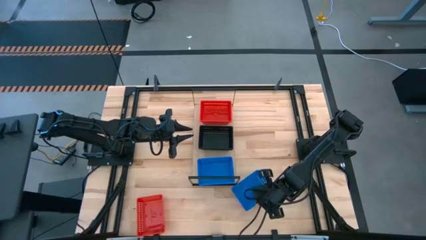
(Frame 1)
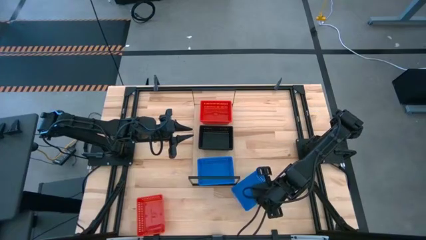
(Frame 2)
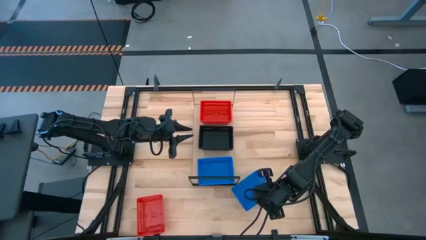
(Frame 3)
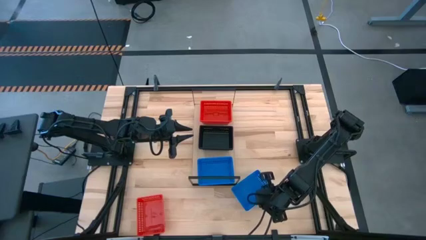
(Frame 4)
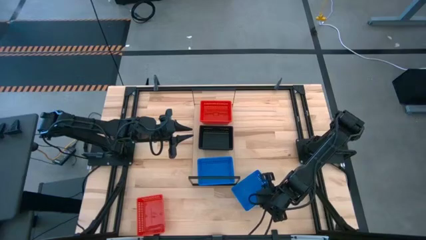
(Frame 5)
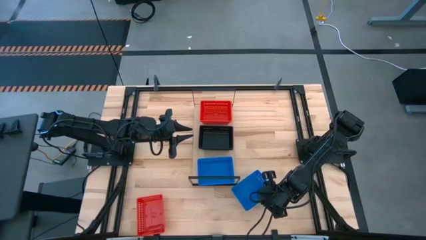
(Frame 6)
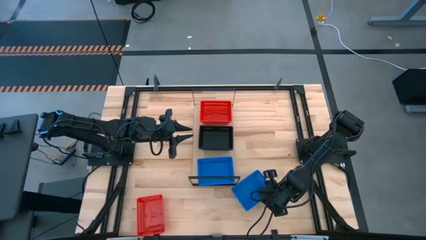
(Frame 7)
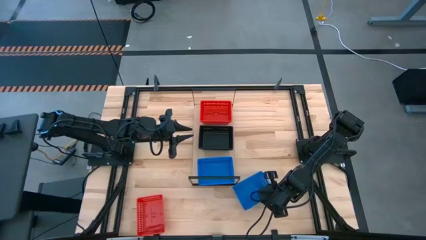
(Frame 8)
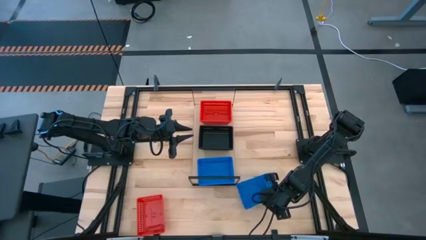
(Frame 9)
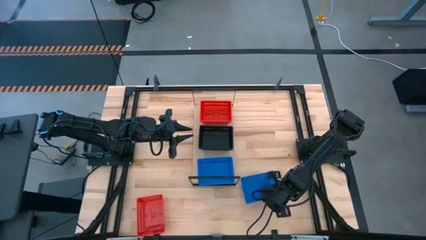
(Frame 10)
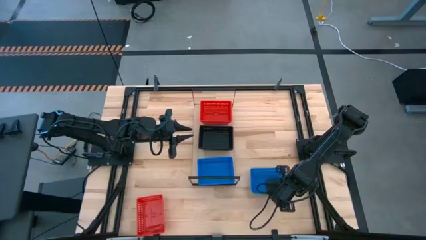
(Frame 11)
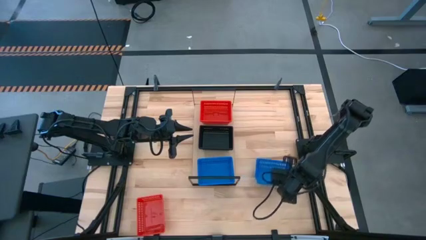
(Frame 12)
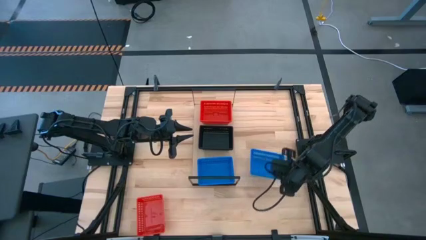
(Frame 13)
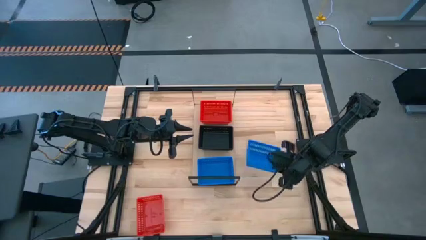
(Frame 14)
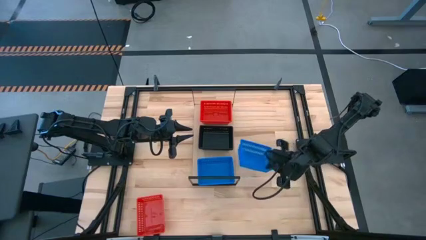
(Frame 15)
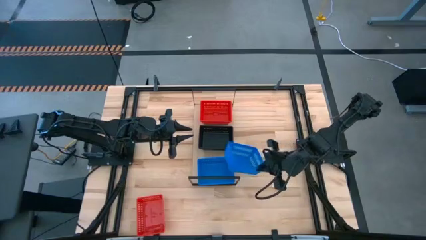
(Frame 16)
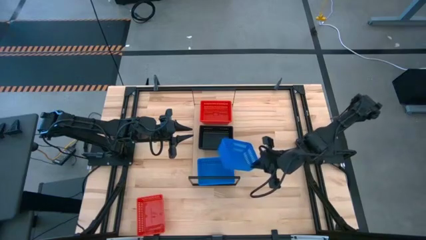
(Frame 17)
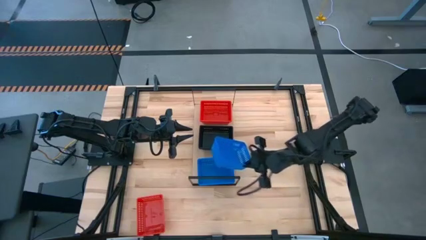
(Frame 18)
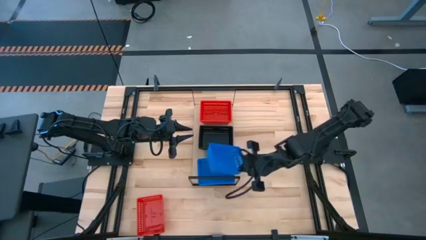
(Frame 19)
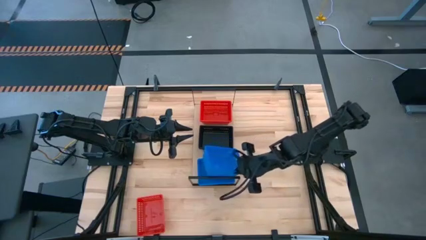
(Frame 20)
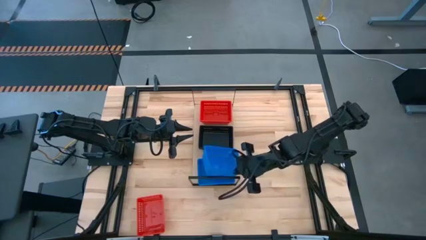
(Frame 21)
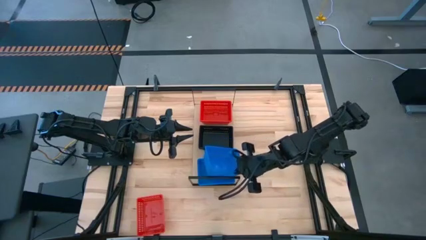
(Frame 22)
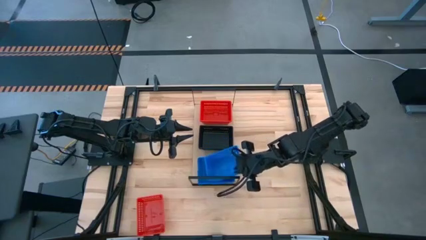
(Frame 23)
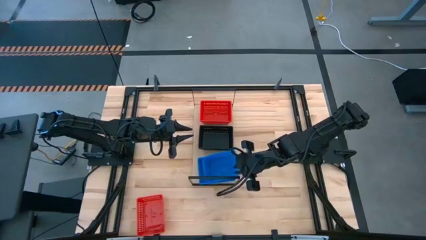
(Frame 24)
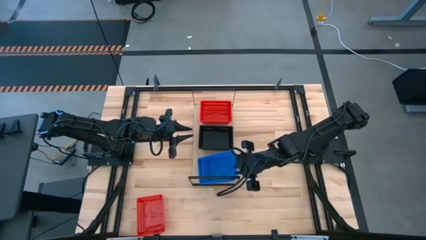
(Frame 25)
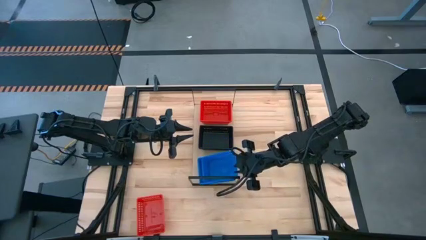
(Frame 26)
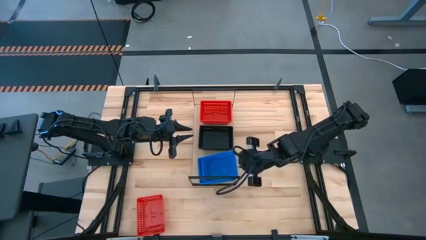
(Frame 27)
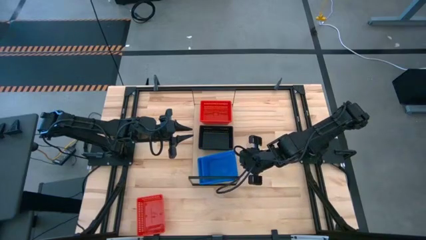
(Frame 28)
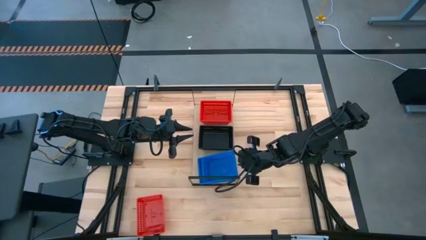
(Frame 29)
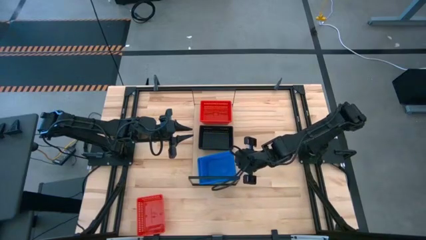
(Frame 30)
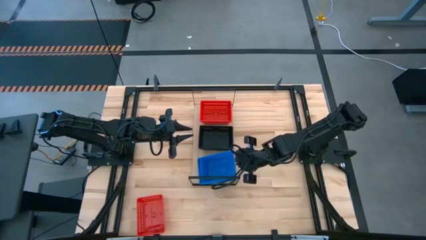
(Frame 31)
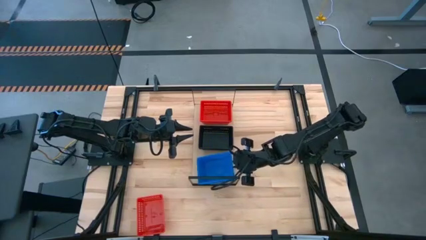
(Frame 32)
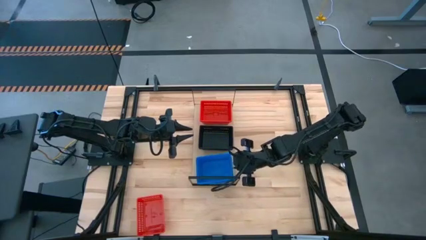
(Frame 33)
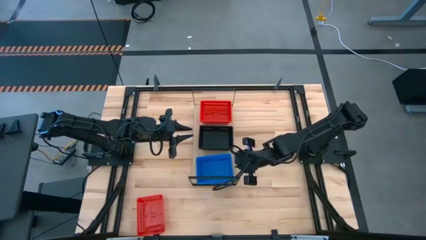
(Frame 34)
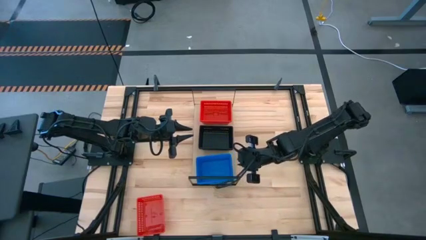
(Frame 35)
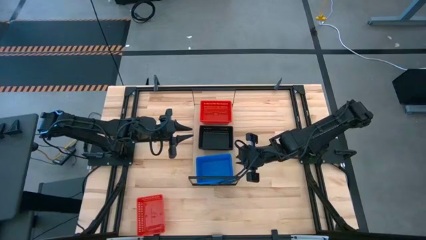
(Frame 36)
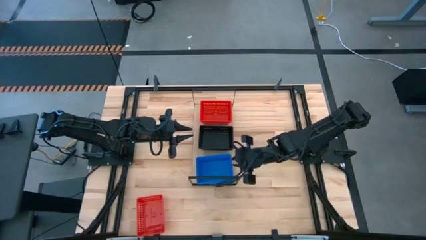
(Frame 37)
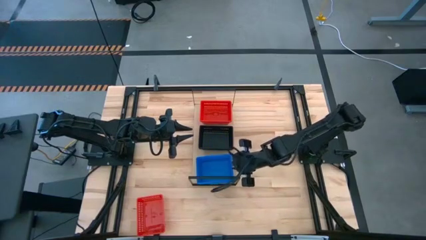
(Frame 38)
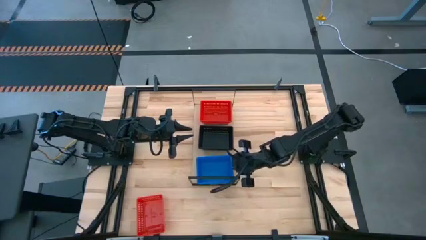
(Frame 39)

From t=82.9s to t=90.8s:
Task: Stack baskets on shelf by color
Stack the blue bin on top of the blue bin on the shelf

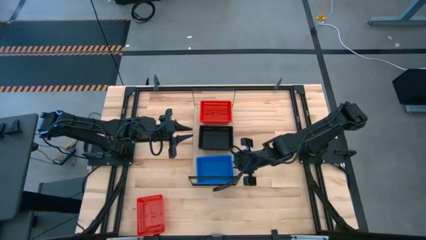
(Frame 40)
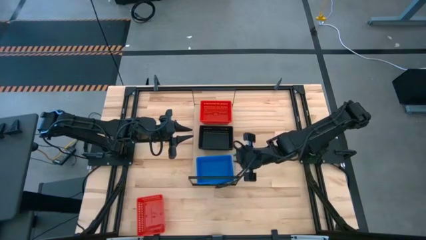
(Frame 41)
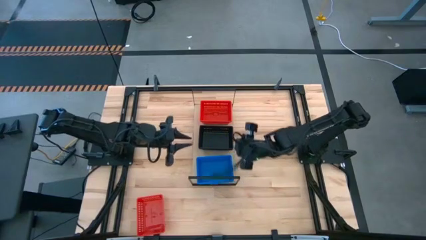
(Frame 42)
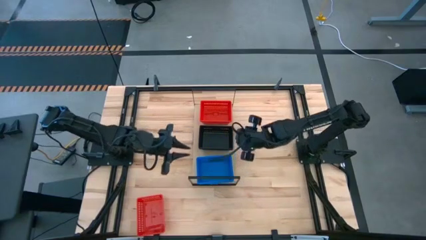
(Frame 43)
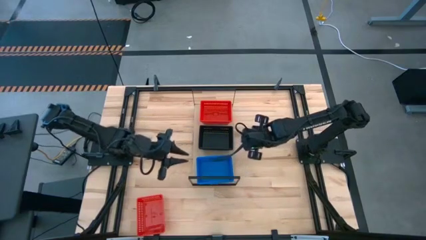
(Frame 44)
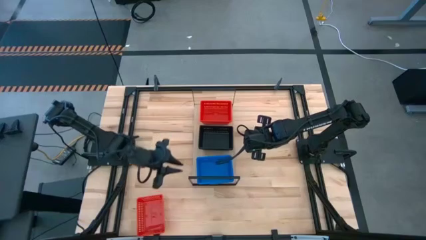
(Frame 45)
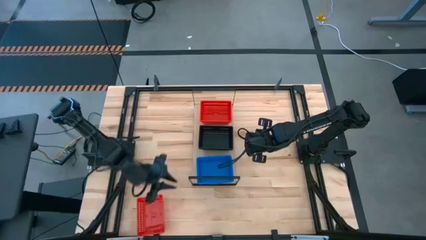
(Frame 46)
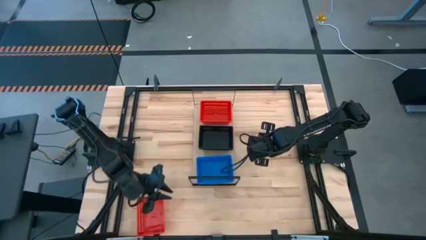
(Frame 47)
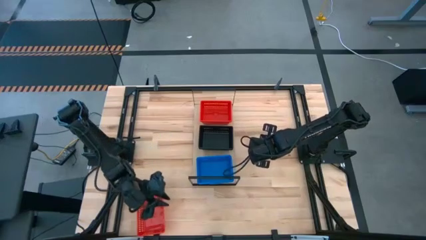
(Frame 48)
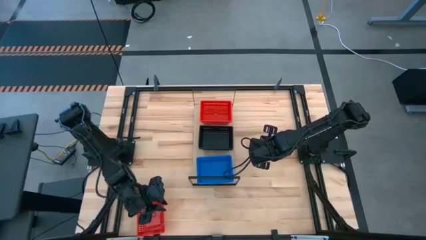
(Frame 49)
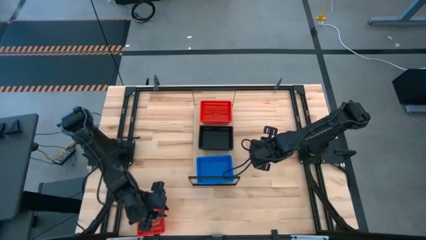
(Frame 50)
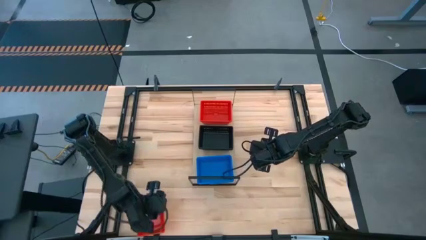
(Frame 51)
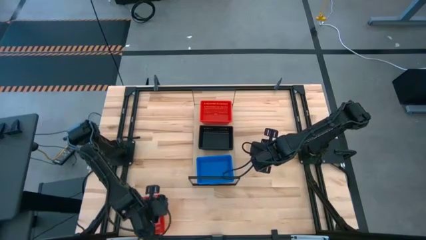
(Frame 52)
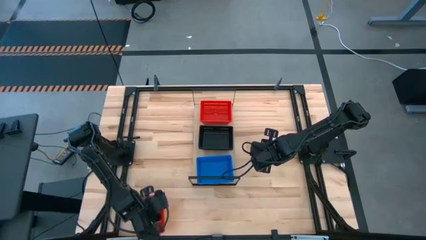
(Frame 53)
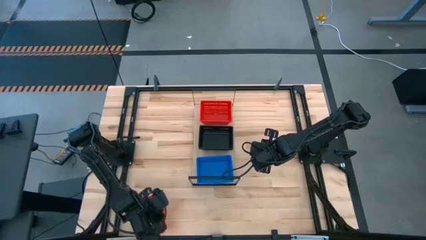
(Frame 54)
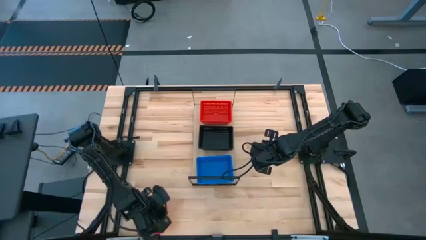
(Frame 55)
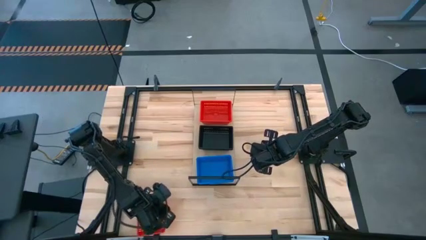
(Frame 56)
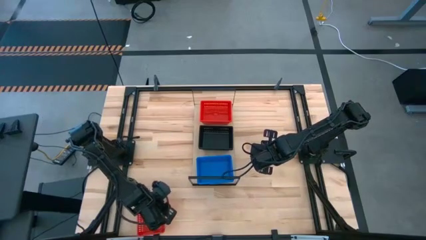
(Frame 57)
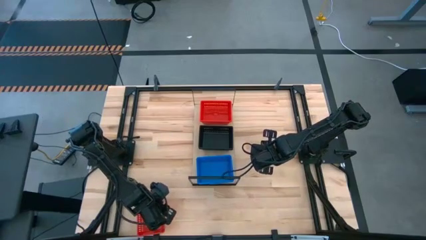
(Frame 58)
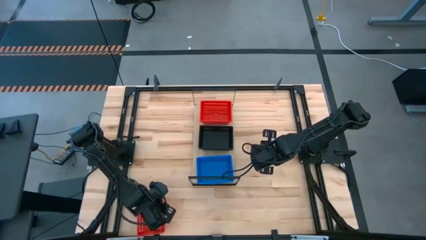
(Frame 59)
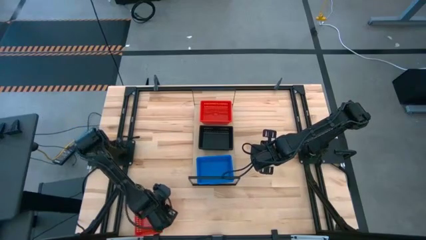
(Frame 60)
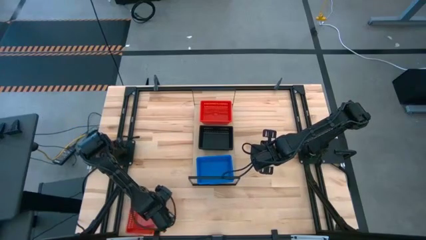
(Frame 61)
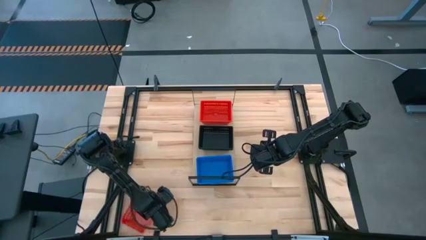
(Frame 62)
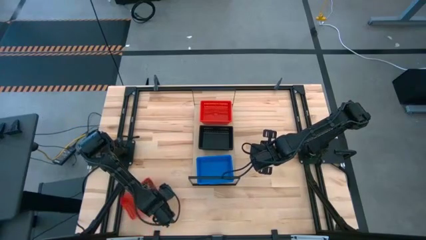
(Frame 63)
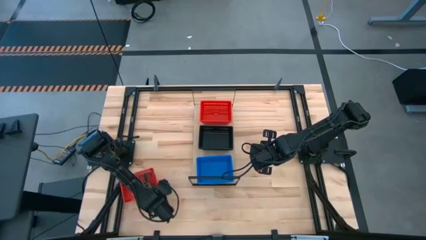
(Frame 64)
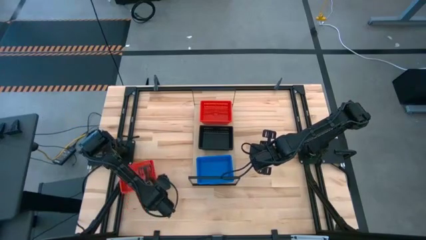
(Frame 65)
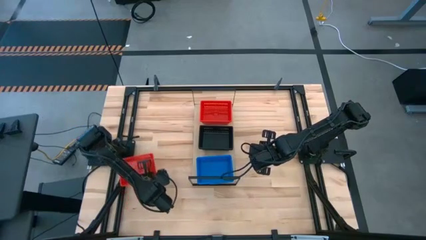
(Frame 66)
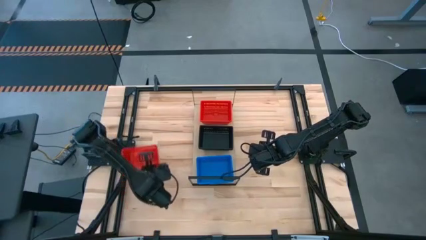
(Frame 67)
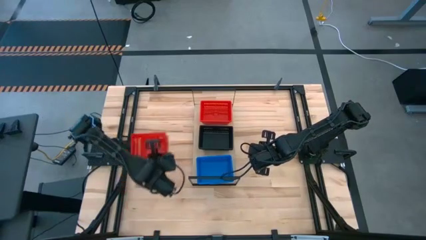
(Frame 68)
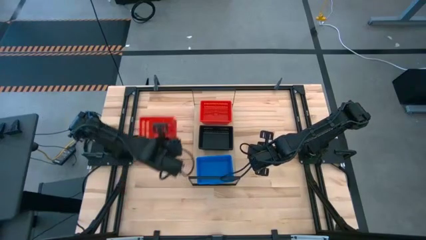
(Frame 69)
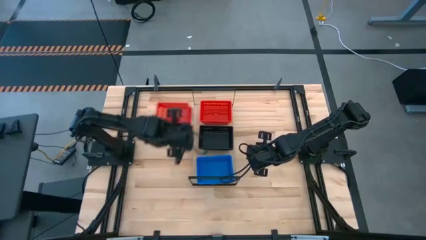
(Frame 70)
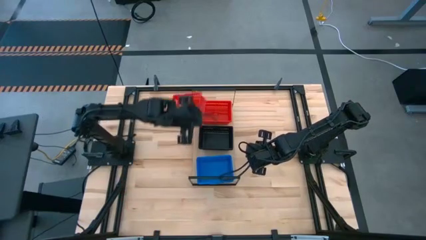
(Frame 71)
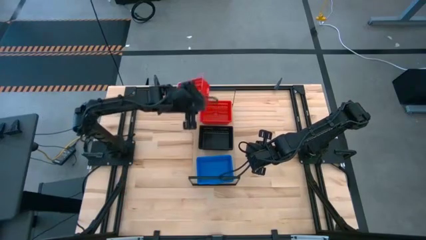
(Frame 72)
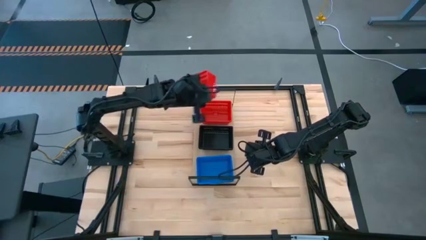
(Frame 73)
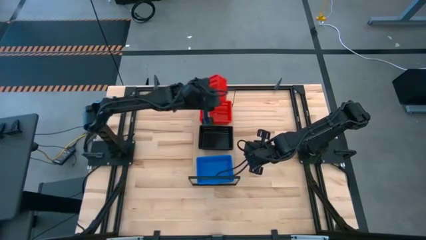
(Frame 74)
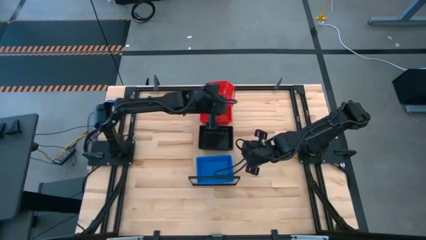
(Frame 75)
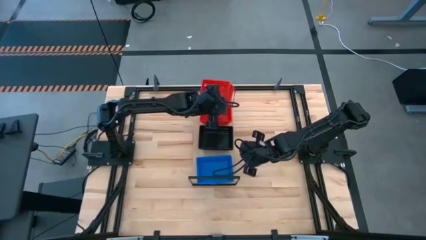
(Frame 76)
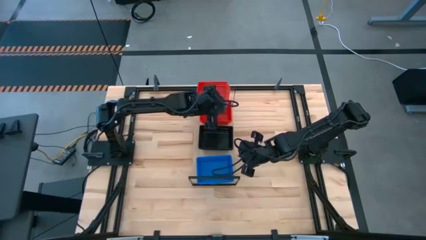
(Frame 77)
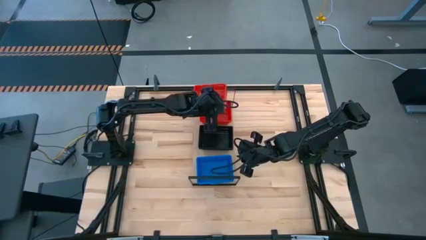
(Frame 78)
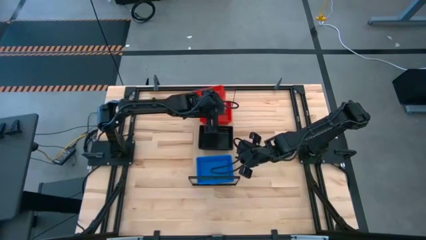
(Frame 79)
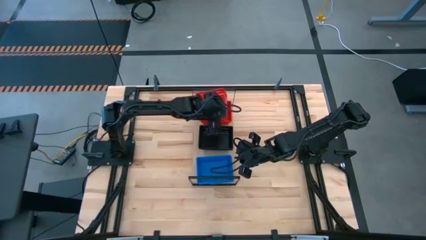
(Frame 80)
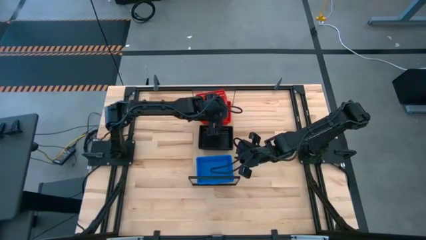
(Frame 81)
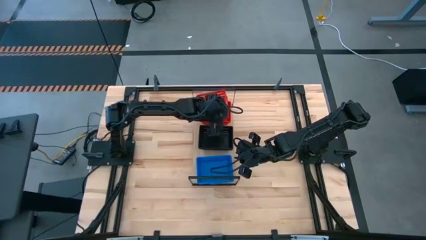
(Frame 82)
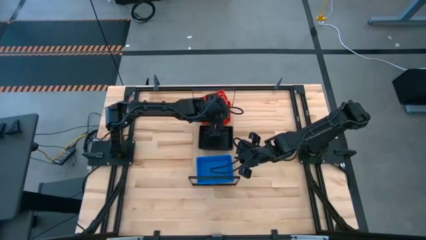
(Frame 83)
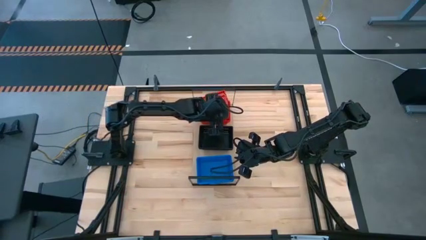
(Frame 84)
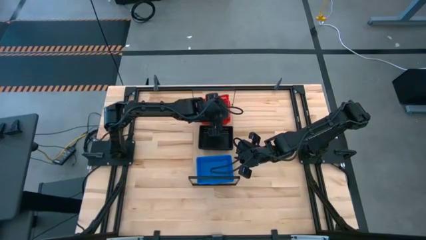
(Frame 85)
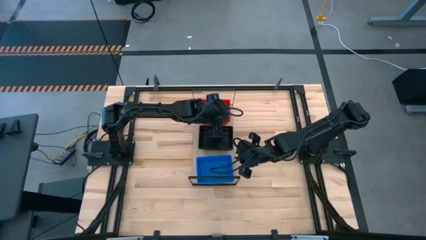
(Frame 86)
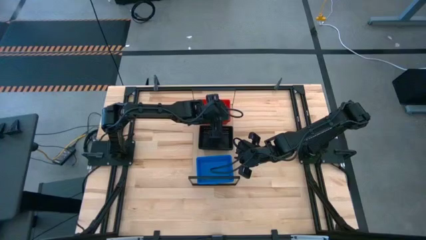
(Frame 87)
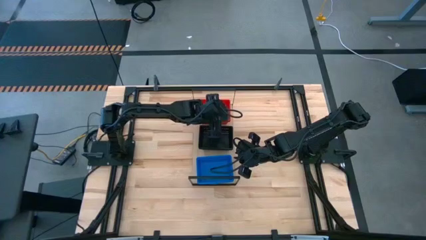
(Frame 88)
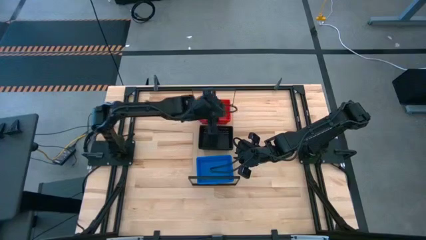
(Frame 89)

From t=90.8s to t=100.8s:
Stack the red bin on top of the red bin on the shelf
